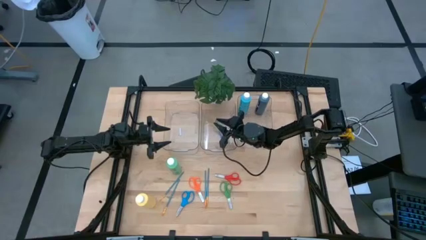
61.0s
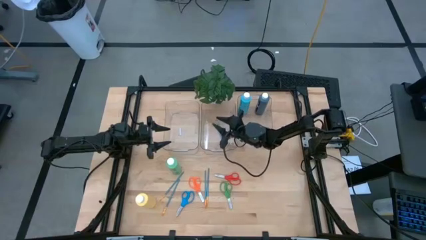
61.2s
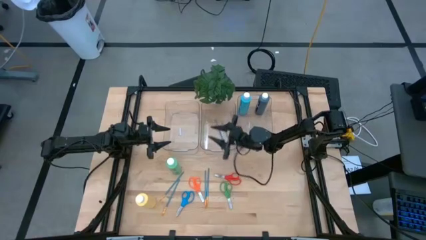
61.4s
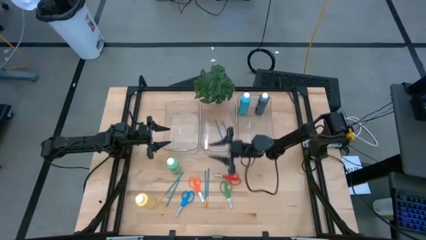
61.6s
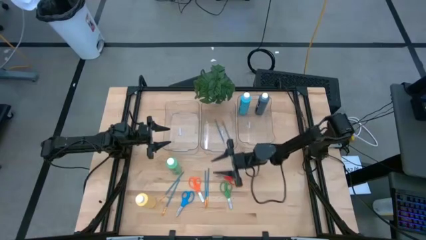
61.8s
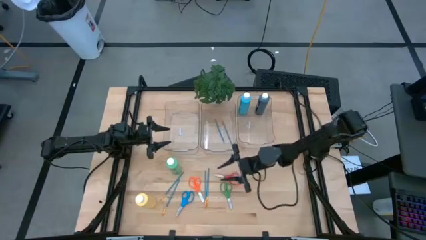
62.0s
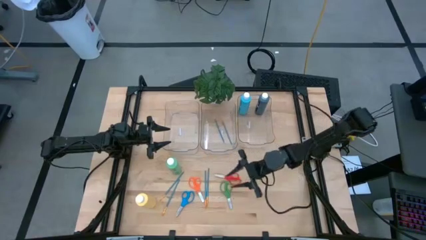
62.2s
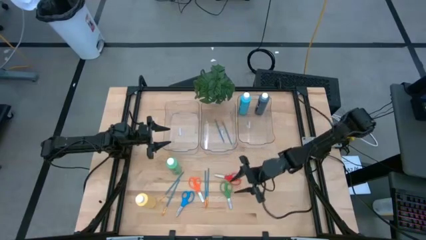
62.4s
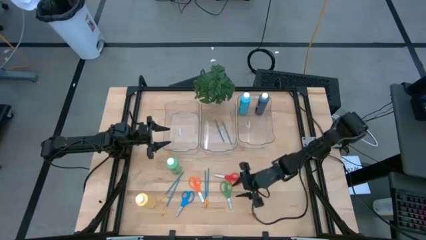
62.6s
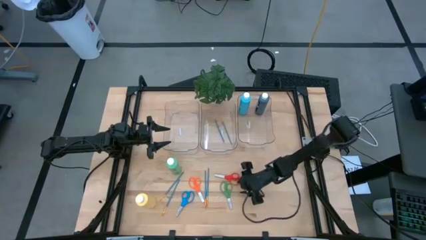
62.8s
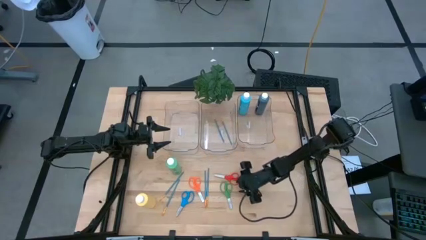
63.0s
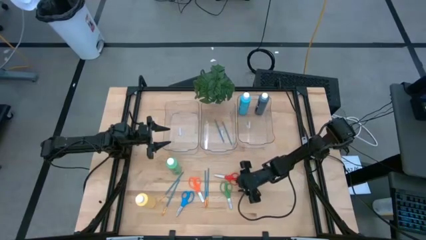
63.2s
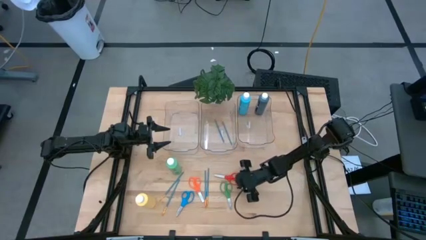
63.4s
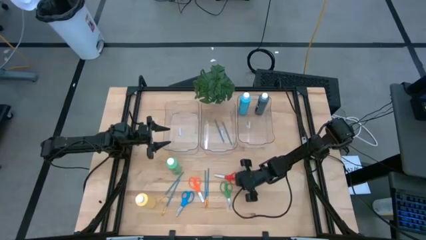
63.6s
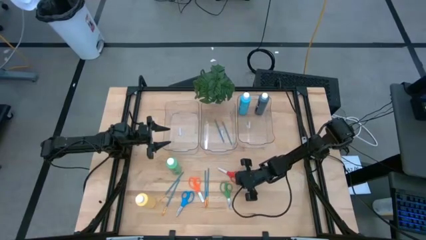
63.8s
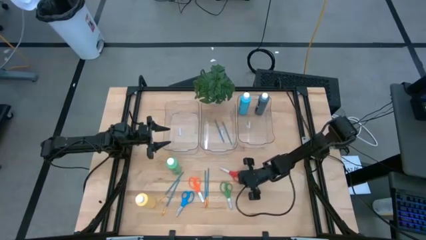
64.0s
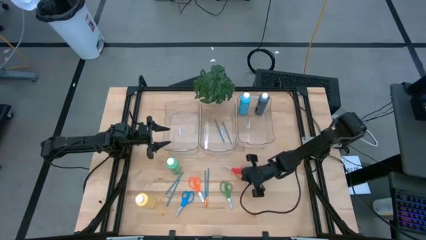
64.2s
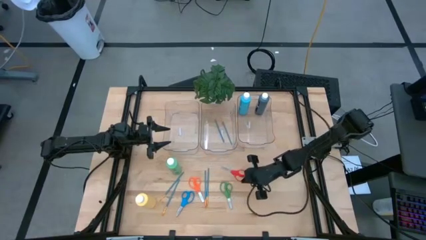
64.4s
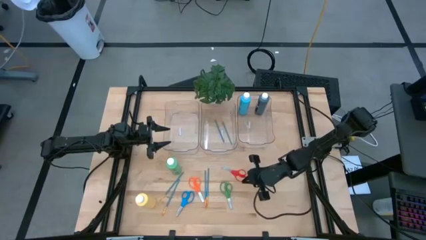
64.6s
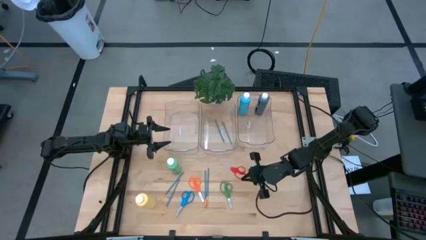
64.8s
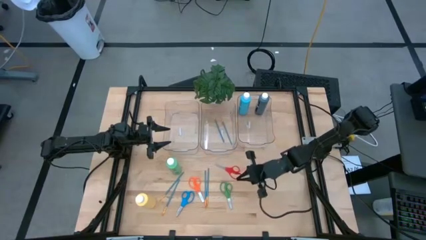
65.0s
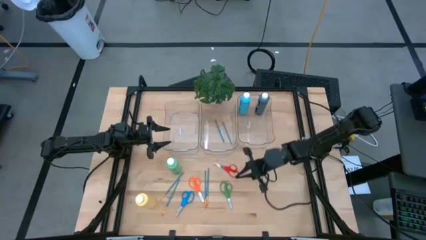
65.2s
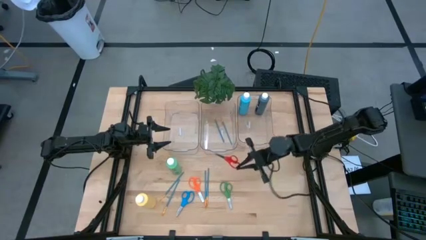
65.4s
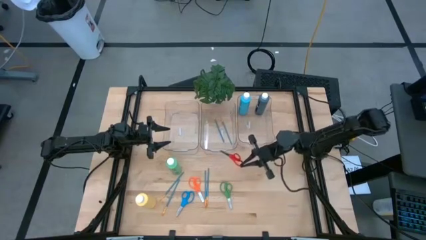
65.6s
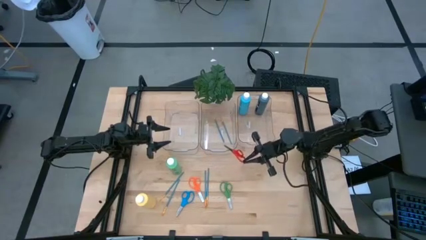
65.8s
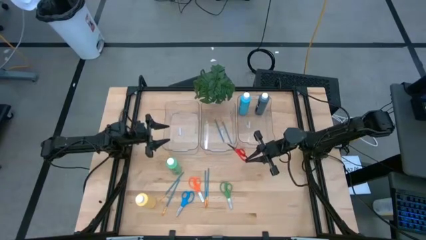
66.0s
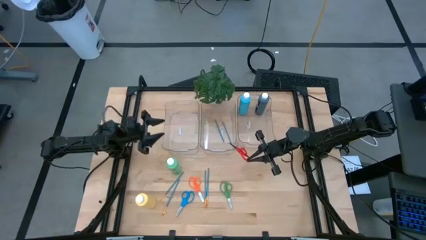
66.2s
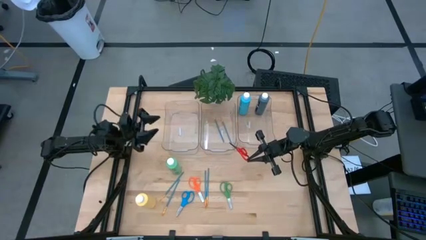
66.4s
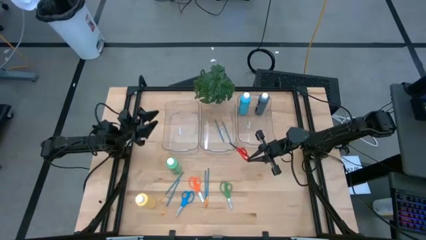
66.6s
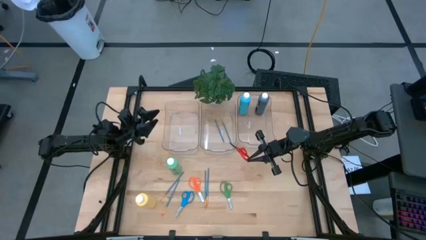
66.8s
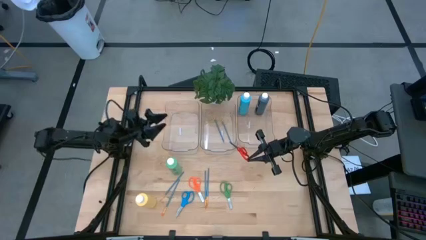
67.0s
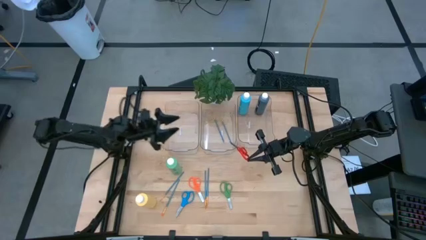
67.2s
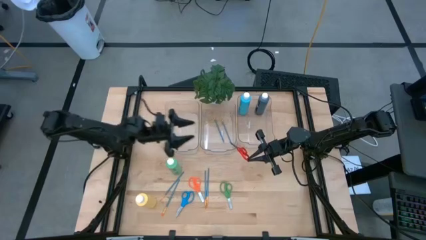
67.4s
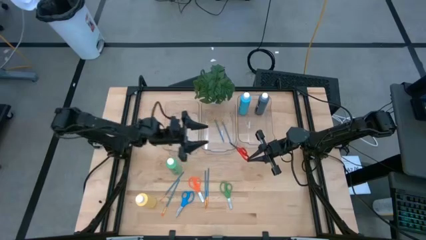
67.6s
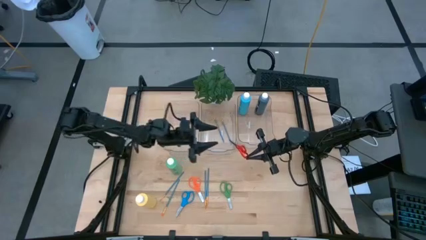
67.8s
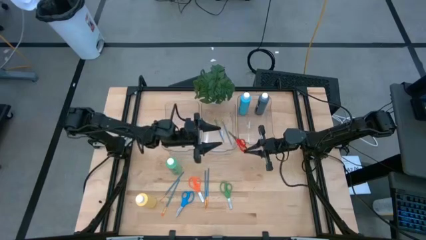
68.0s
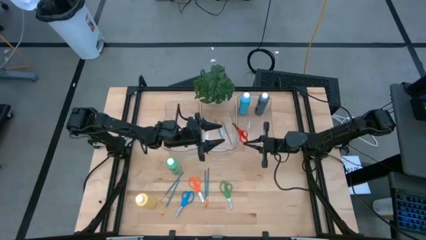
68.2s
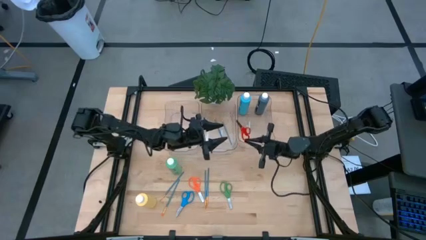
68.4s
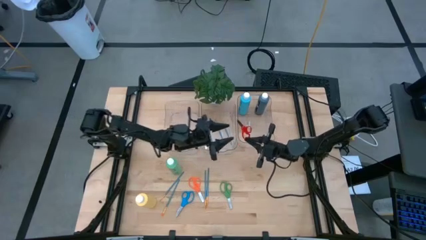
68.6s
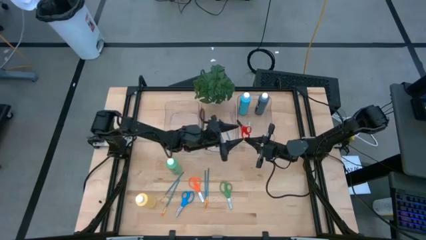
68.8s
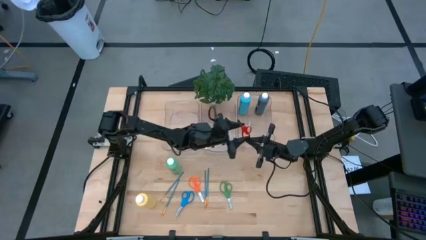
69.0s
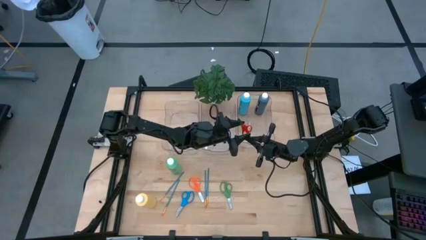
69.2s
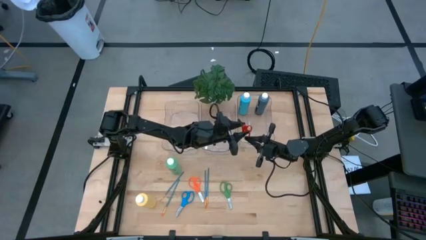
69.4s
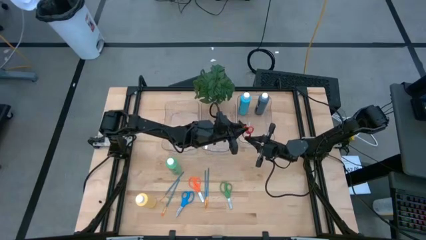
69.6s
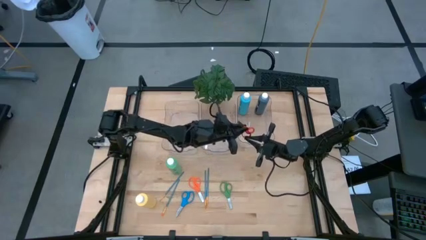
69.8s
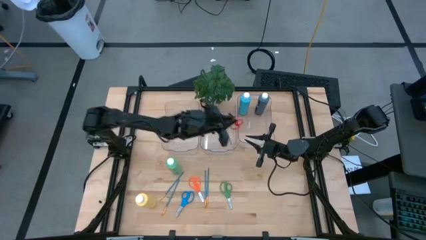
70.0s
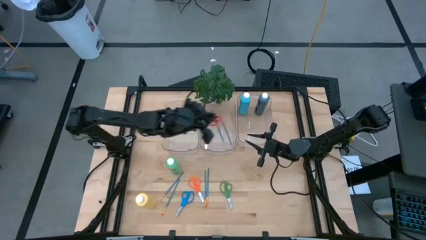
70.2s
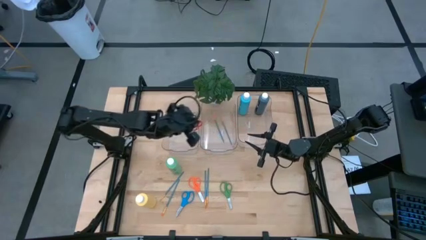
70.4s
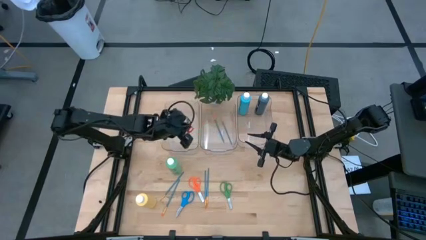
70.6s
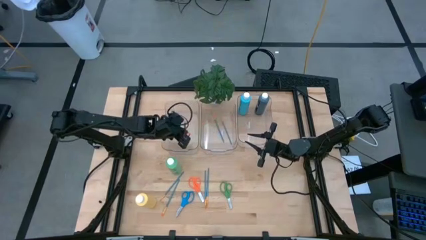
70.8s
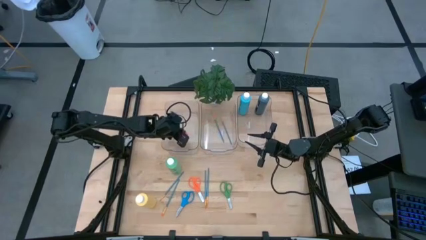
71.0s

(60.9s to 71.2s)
Task: Pick & Place Paint Supplies
Put the red scissors into the left transparent bin

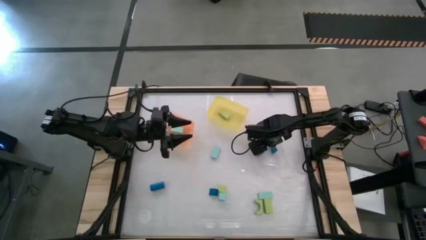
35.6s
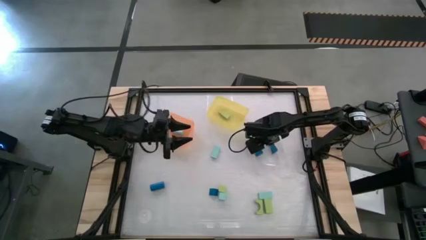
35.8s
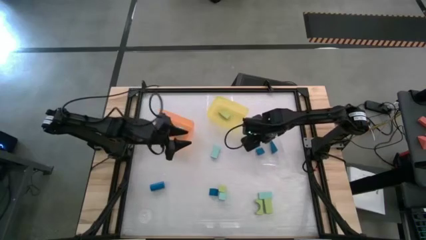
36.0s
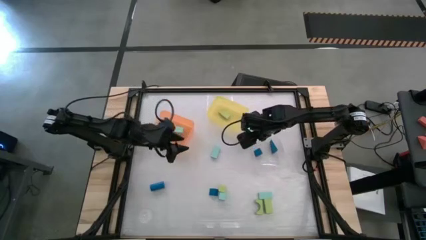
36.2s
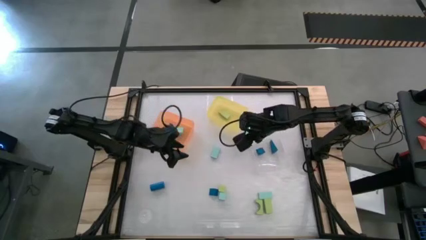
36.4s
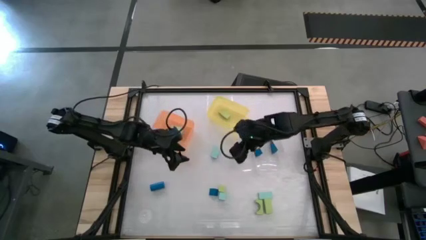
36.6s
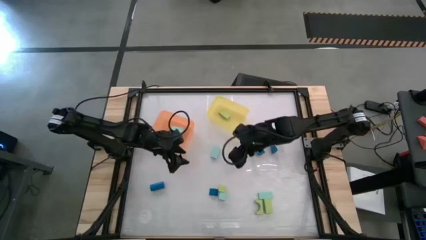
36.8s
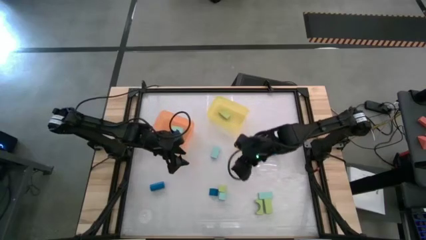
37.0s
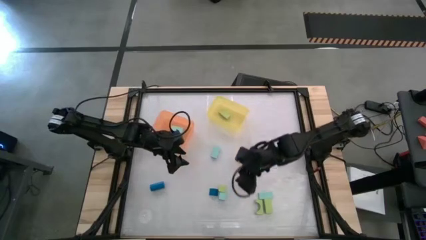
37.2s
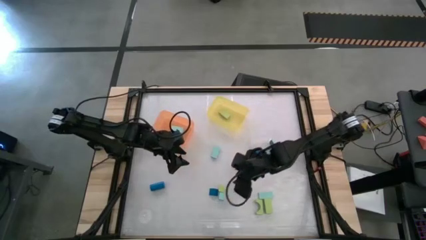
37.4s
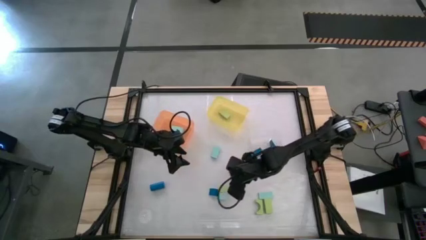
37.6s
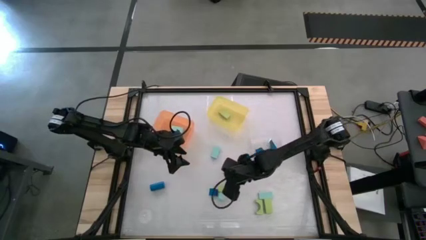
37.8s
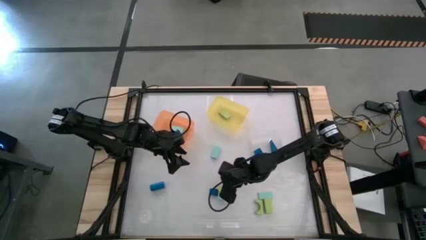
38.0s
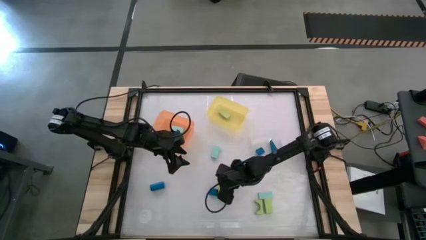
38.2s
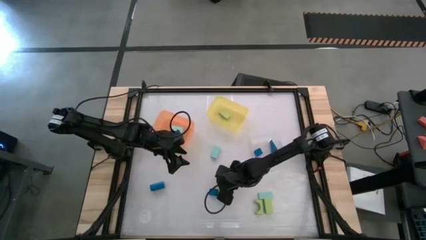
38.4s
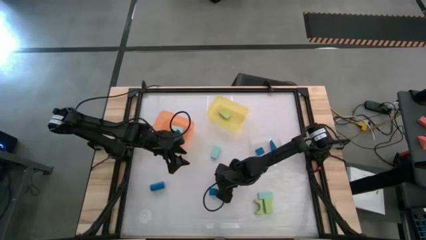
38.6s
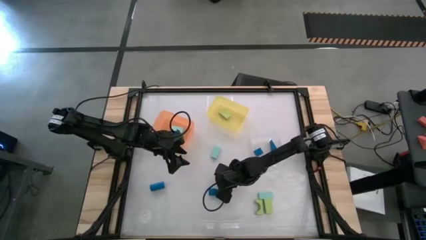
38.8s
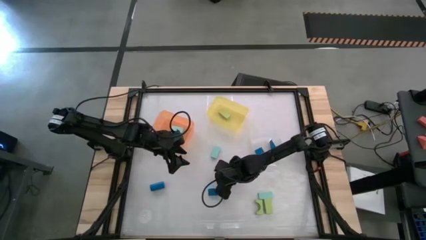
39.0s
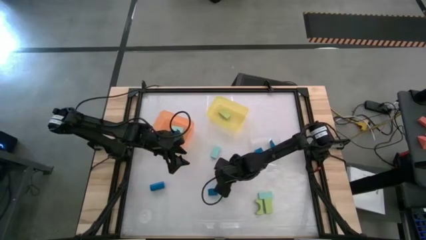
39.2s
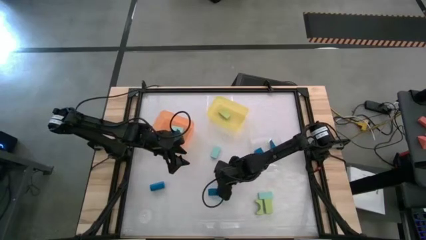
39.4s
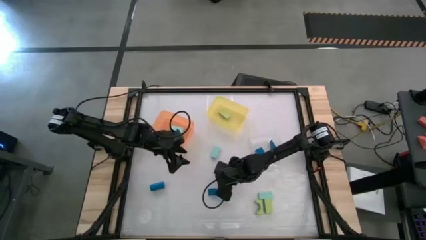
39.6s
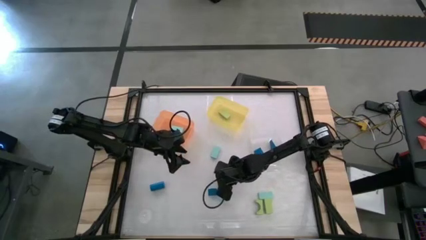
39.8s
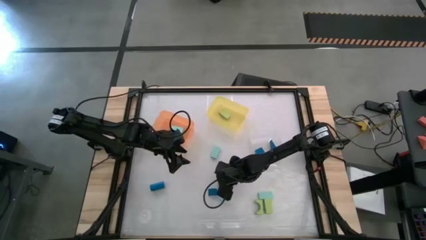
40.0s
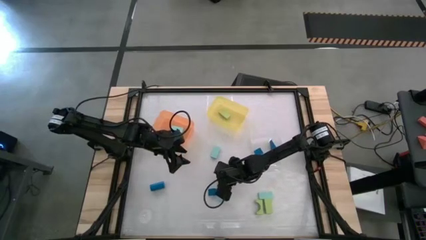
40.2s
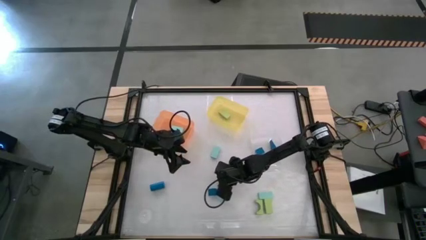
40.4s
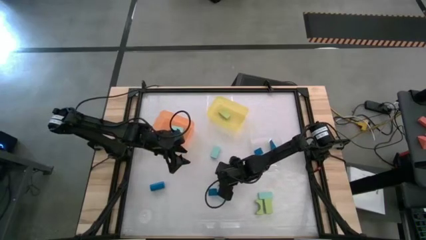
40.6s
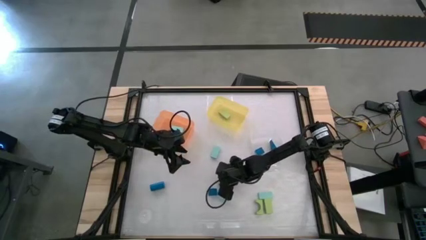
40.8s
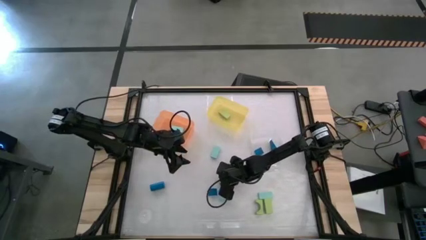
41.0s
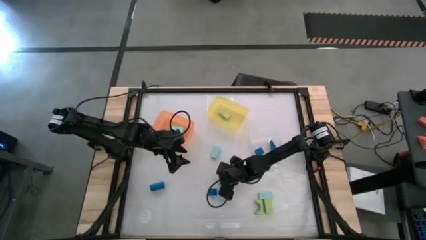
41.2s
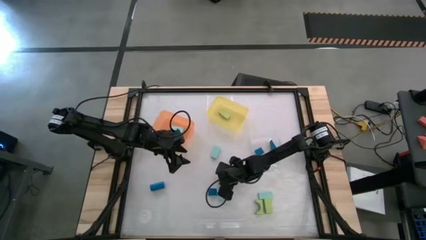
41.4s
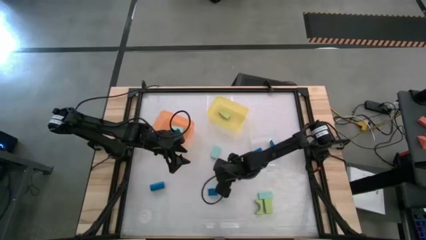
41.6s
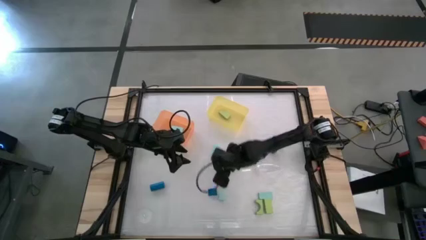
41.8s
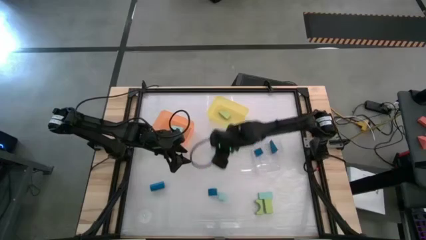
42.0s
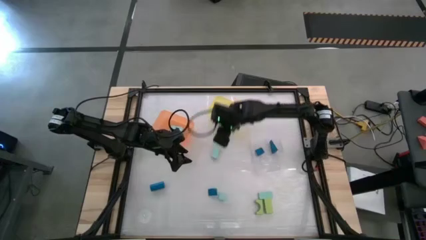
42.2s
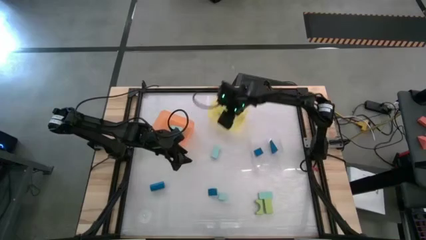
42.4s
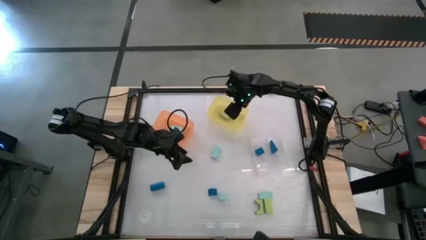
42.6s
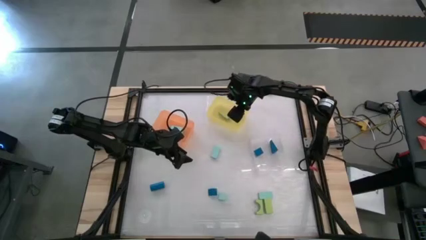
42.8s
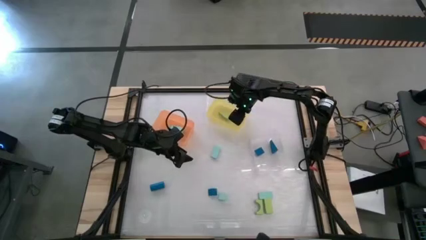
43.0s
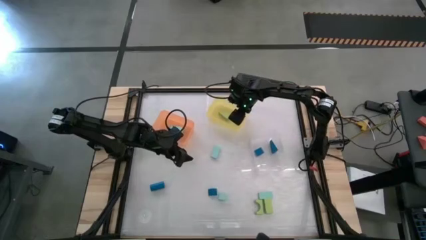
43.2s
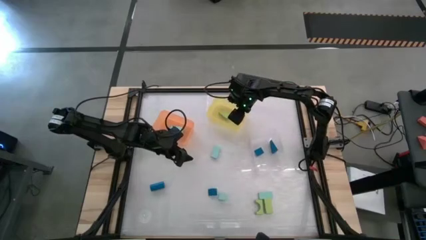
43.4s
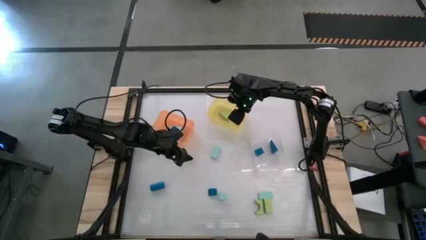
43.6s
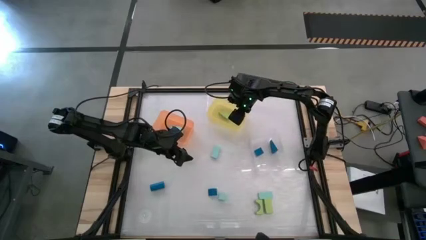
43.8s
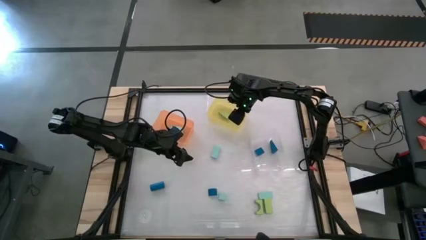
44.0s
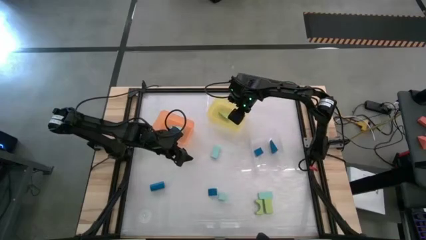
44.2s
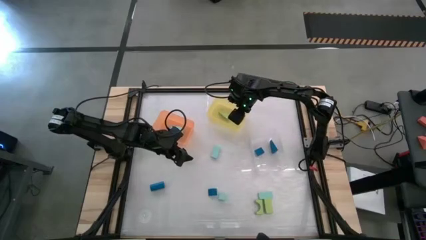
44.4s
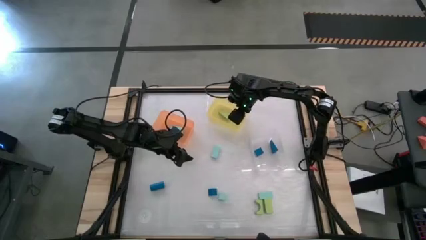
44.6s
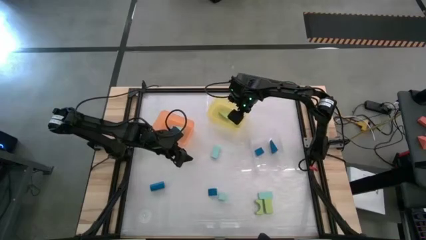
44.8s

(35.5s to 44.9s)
Task: Sort & place blocks by color
Put the light green block into the yellow bin
